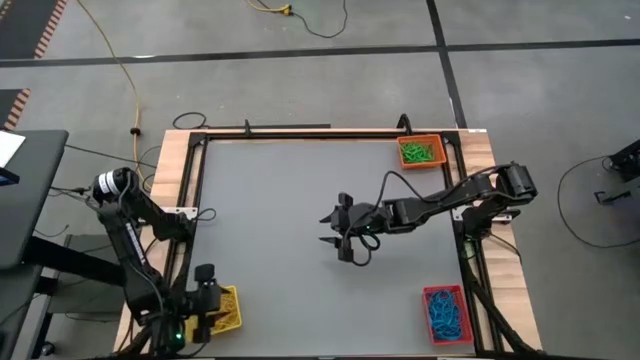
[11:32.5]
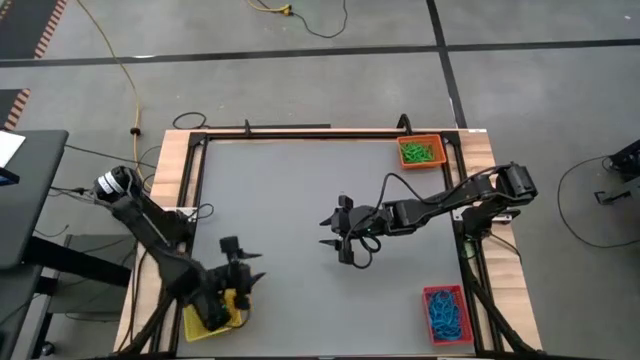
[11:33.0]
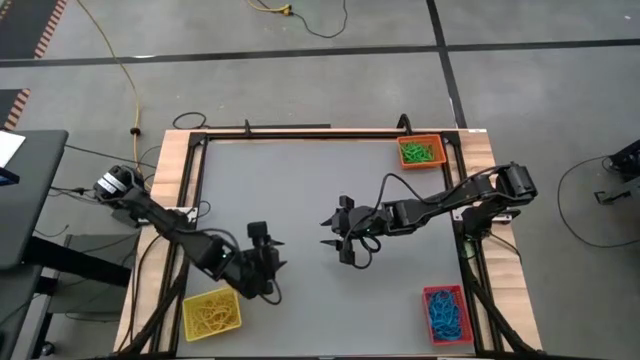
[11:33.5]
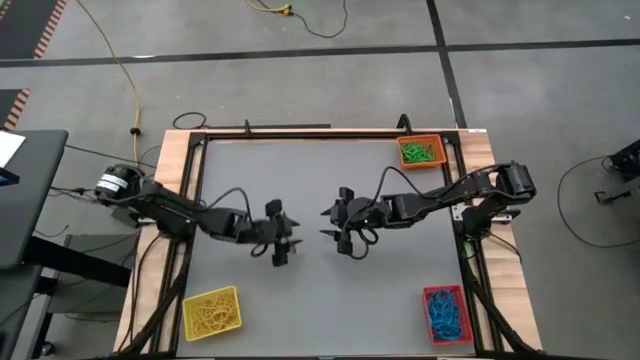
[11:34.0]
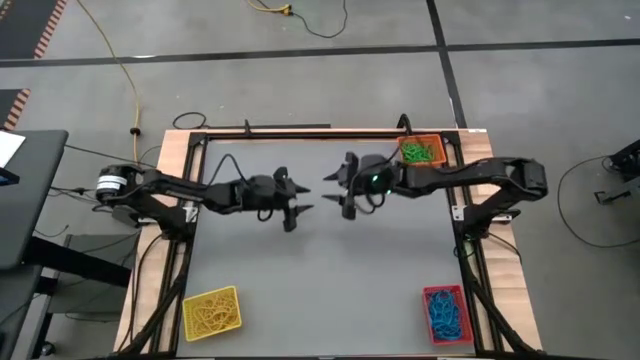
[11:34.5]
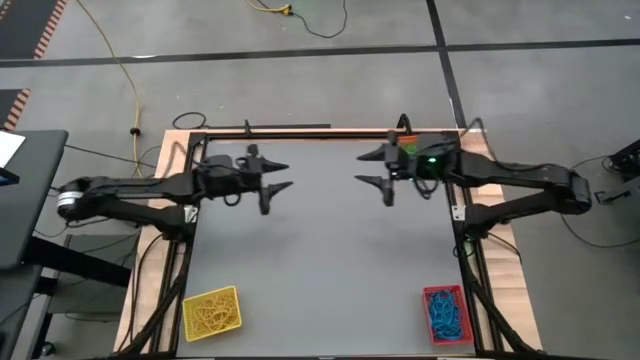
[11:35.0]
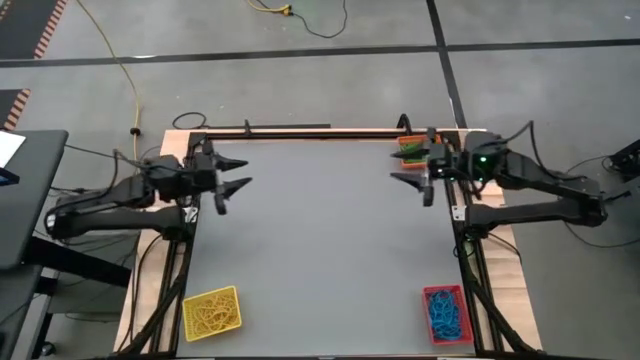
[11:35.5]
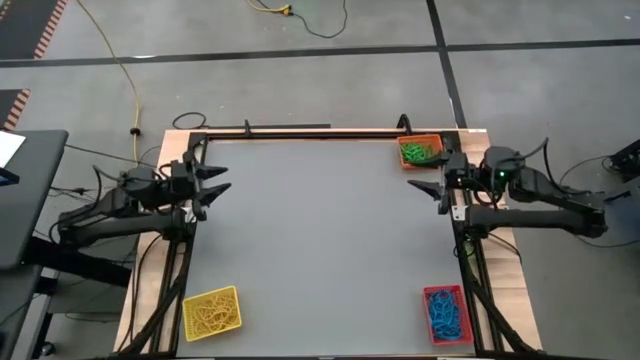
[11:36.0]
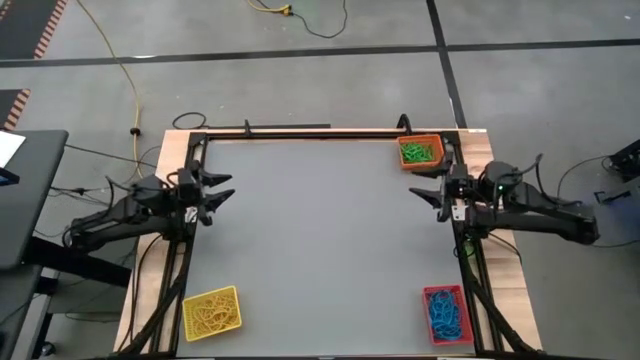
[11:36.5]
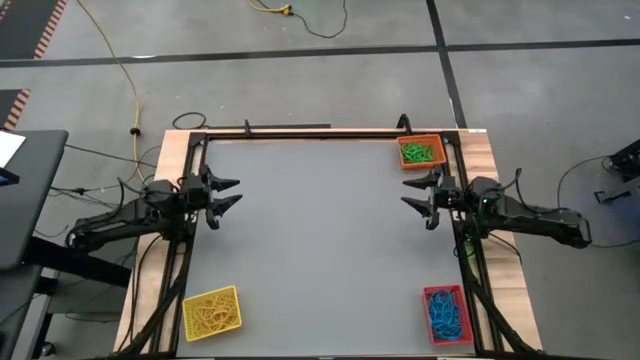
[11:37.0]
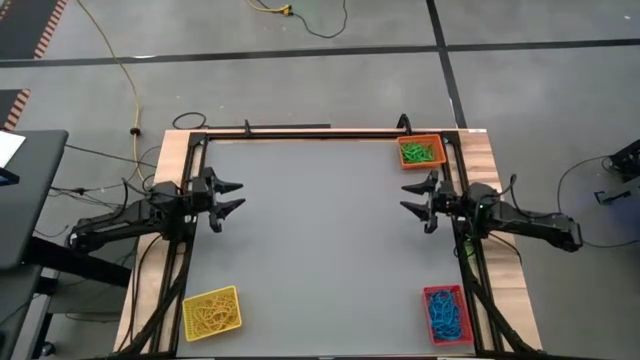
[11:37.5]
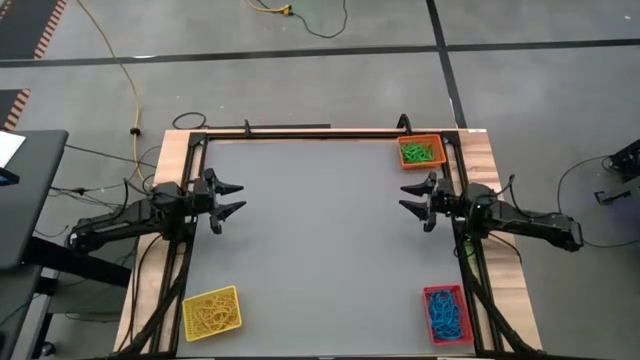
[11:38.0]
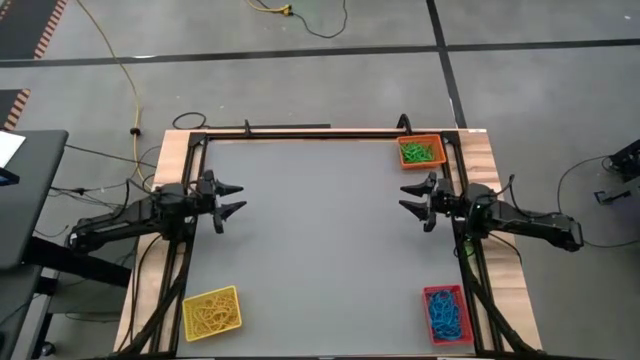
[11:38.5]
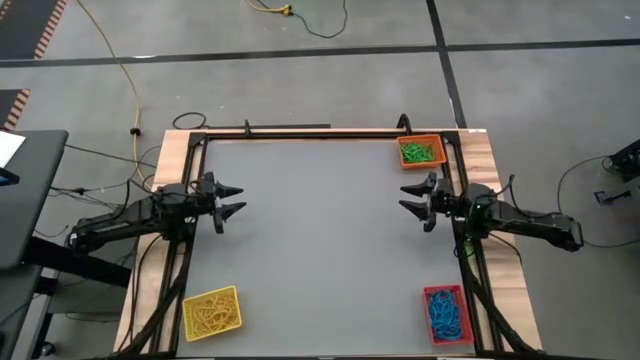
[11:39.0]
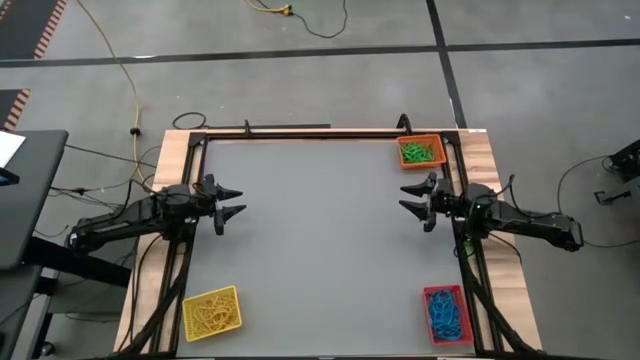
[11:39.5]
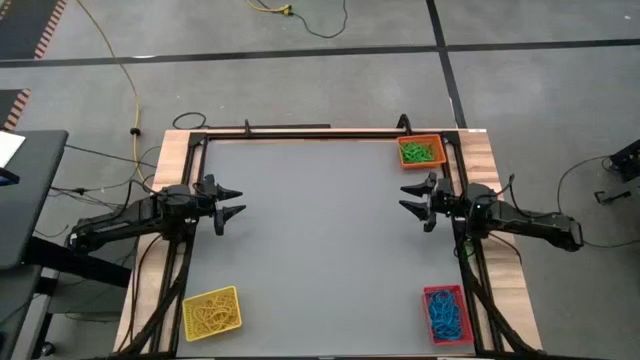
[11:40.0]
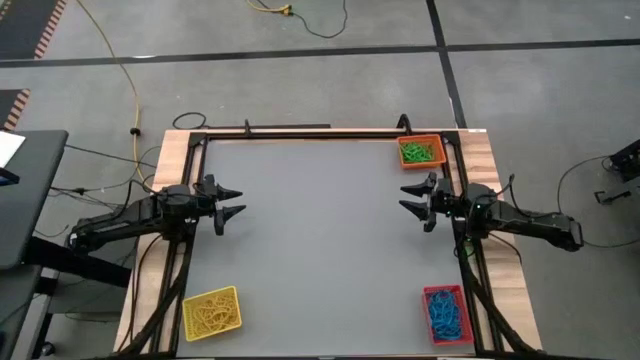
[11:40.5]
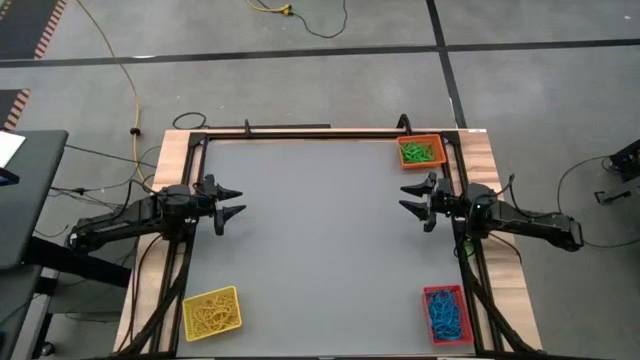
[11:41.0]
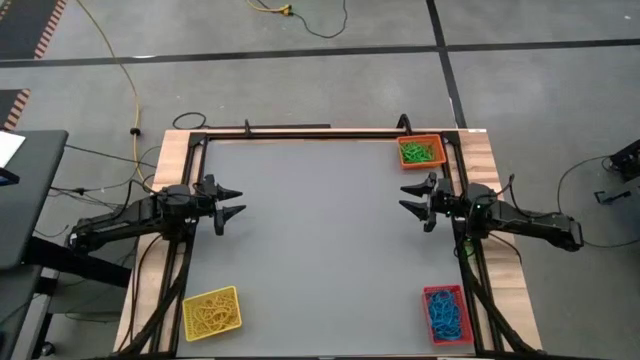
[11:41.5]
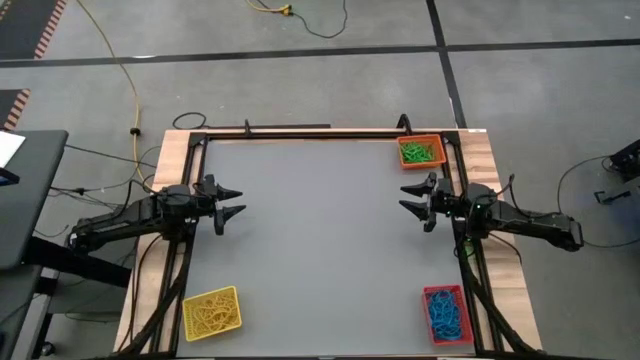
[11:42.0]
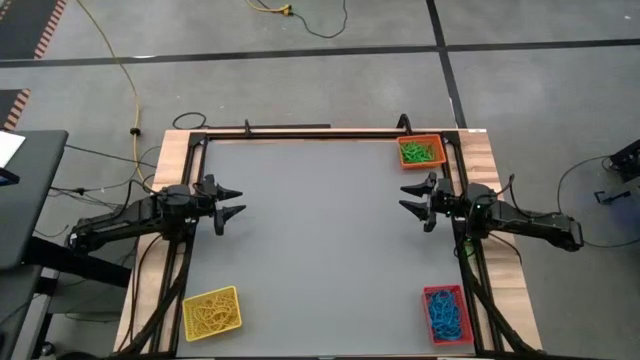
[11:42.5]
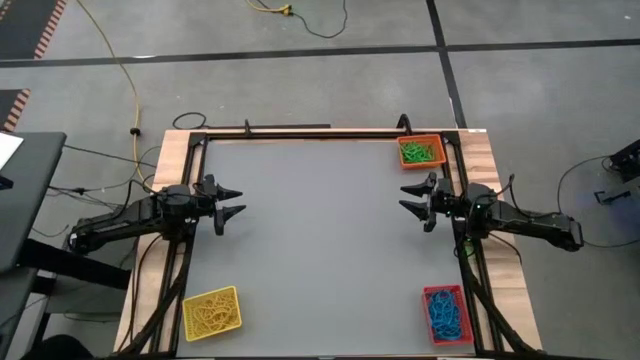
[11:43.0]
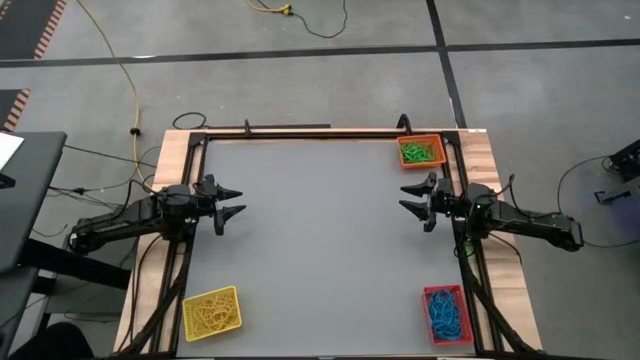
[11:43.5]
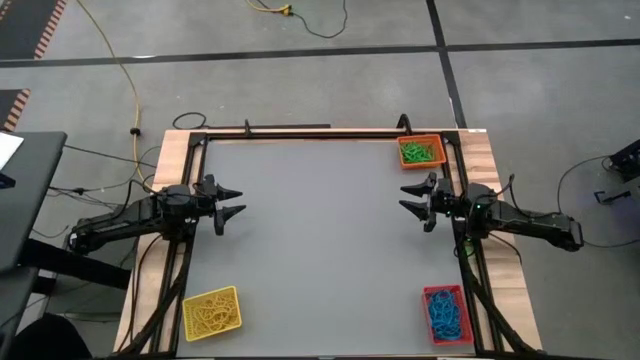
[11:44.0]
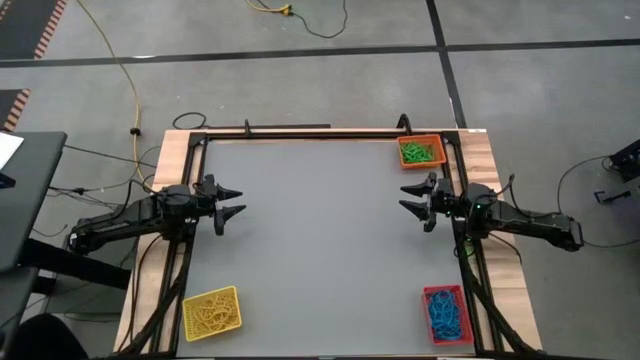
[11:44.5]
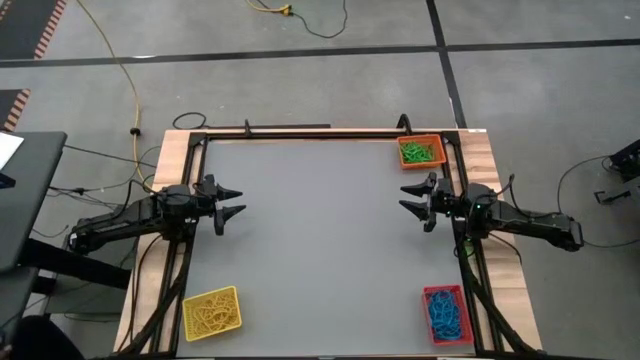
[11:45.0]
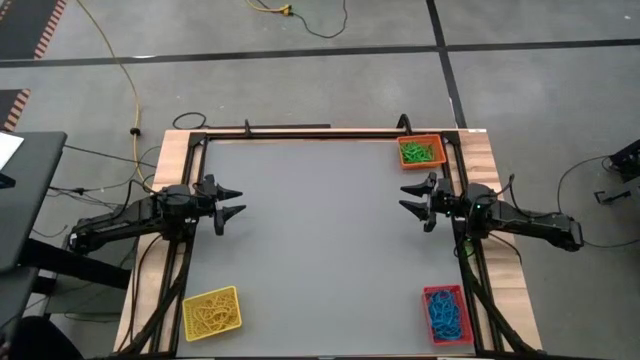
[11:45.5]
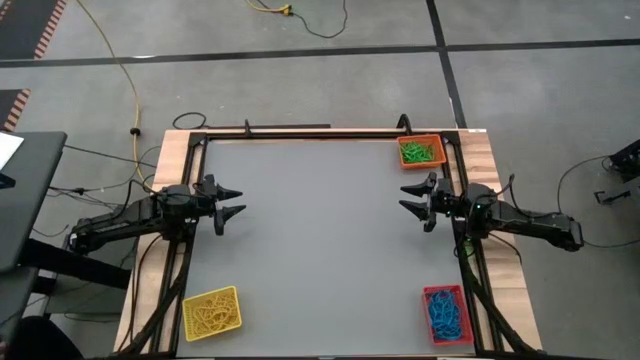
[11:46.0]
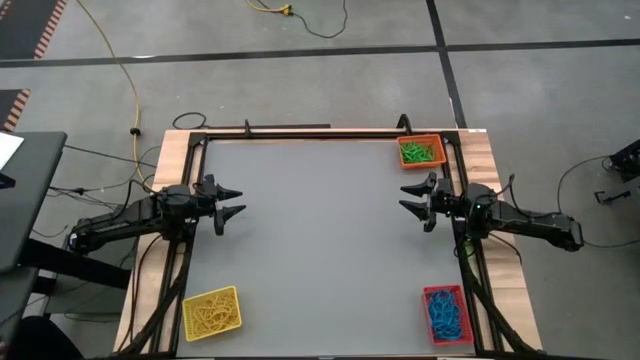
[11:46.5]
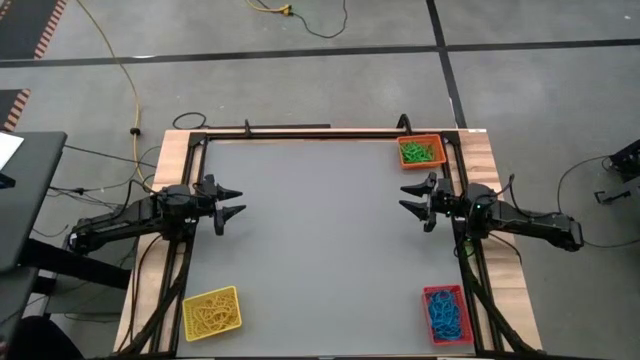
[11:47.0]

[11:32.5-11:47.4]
Task: Sort rubber bands into baskets
Return to Home Position

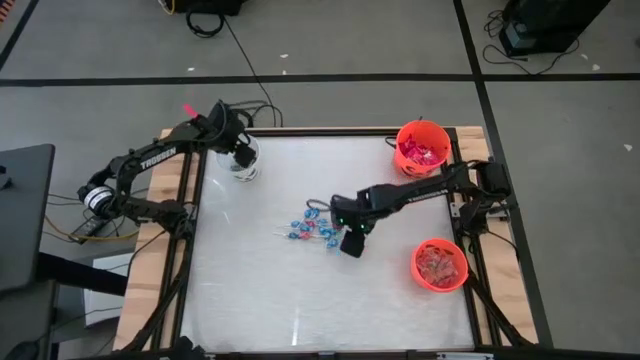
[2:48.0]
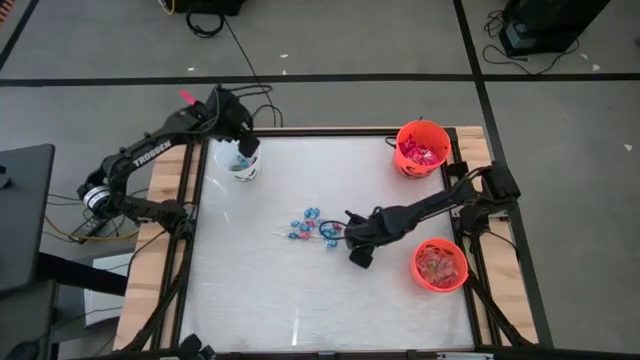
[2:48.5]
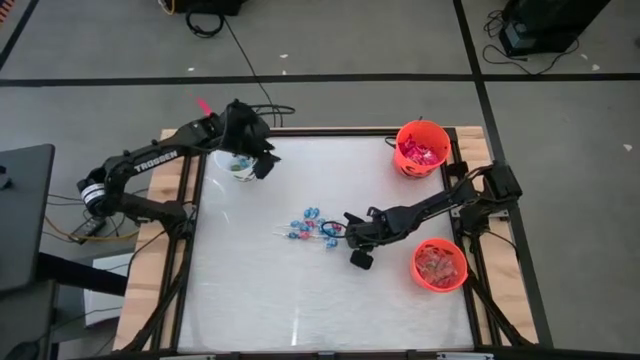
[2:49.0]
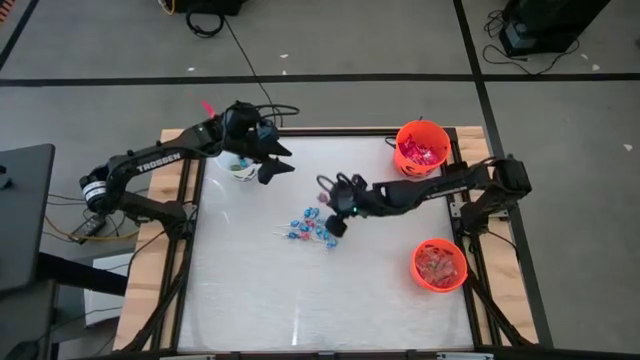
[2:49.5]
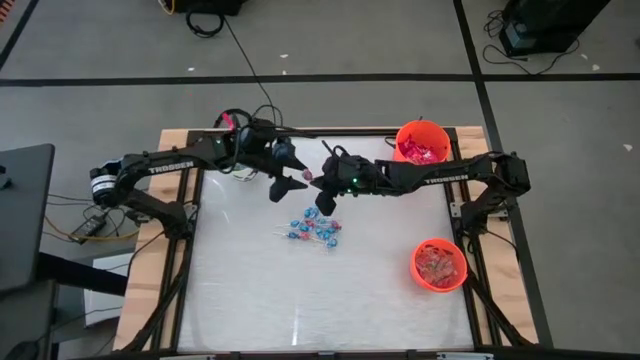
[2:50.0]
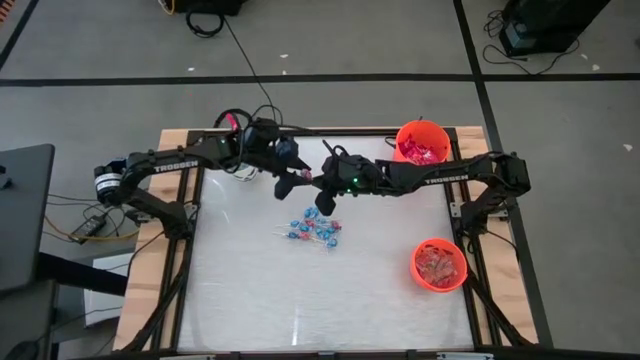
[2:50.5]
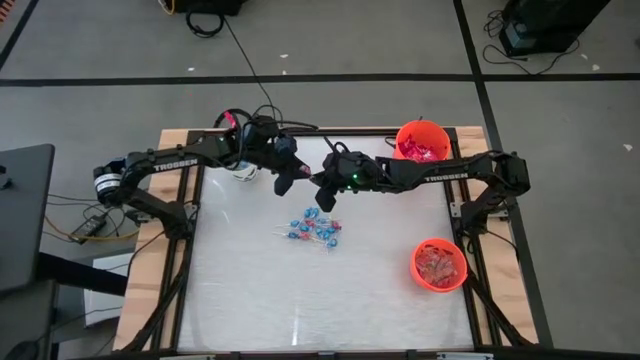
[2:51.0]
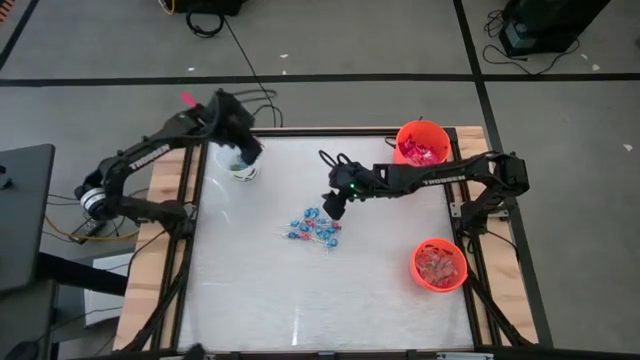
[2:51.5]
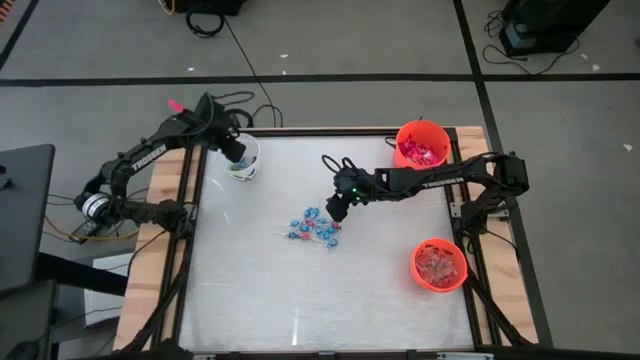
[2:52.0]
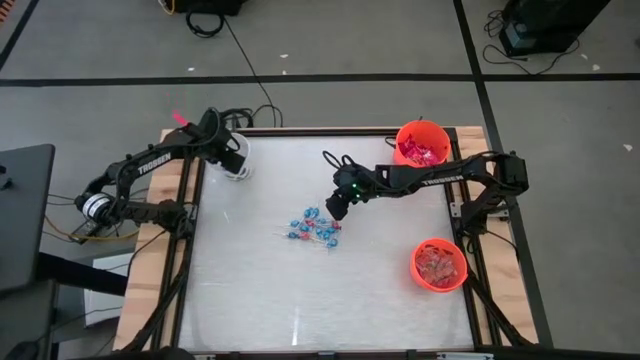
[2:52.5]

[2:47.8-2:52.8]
Task: Sort candy by brand, put in halloween buckets
Put the red candy into the white bucket
